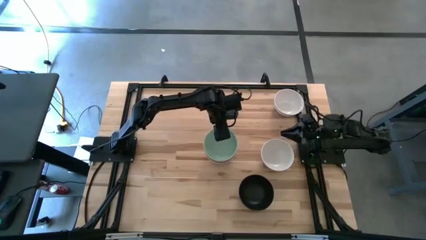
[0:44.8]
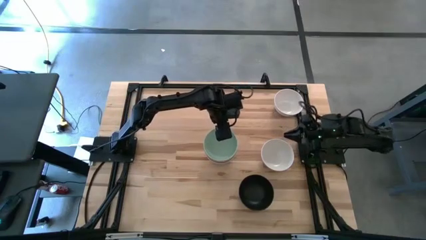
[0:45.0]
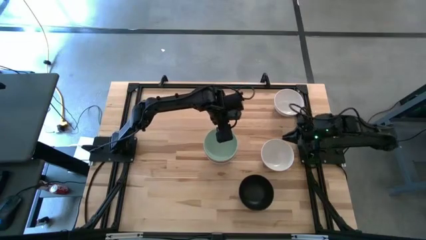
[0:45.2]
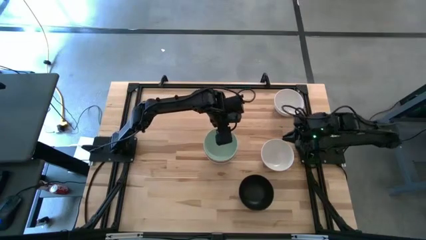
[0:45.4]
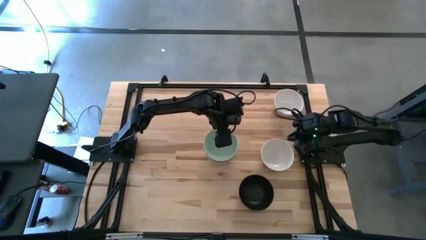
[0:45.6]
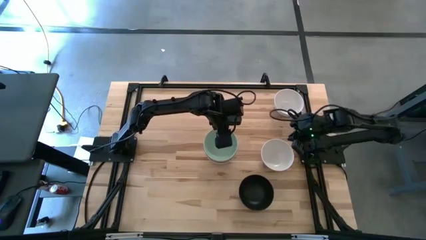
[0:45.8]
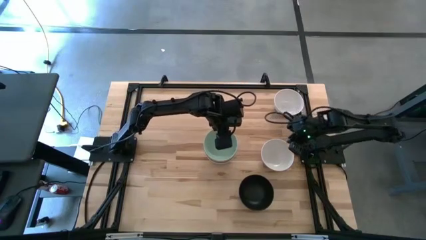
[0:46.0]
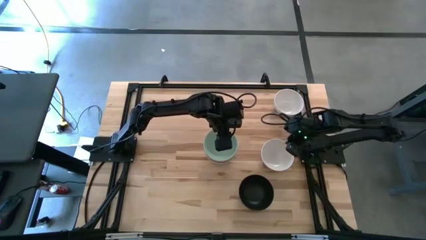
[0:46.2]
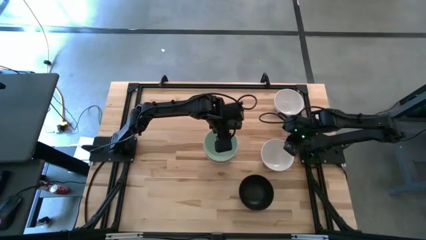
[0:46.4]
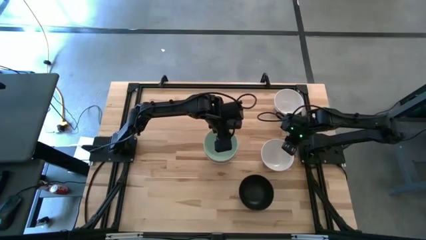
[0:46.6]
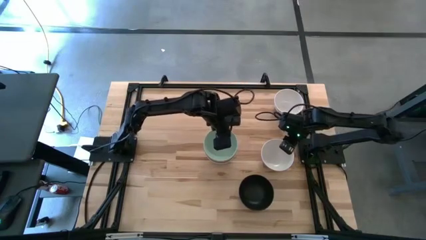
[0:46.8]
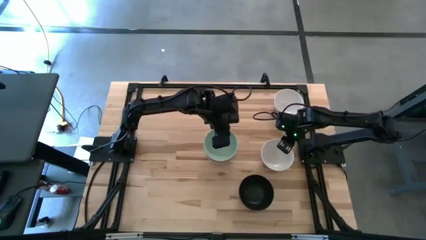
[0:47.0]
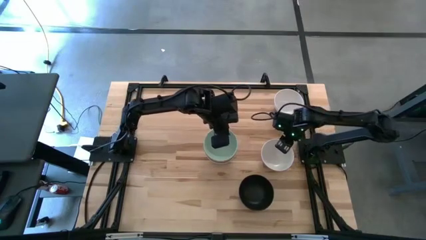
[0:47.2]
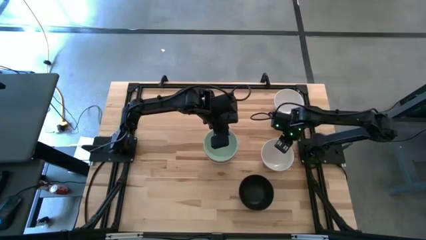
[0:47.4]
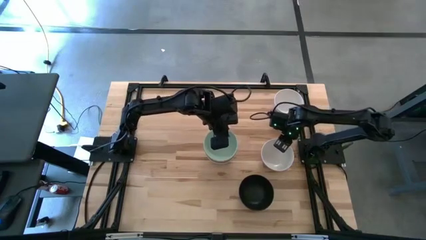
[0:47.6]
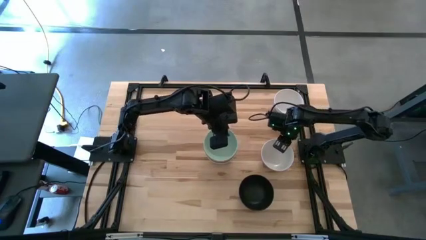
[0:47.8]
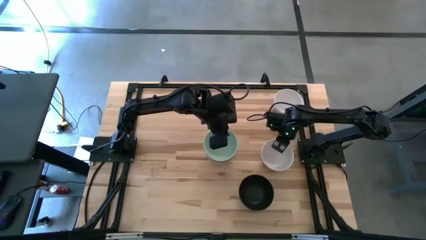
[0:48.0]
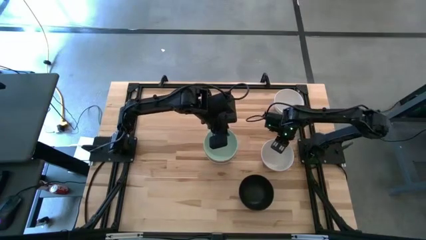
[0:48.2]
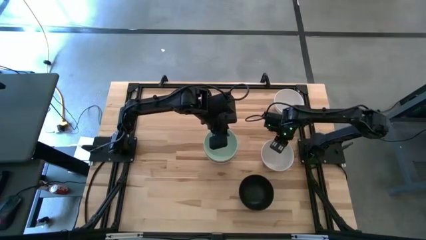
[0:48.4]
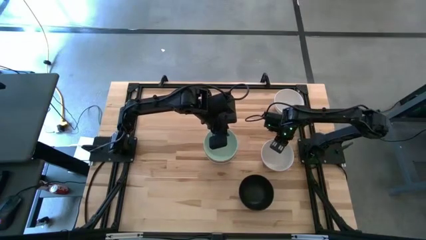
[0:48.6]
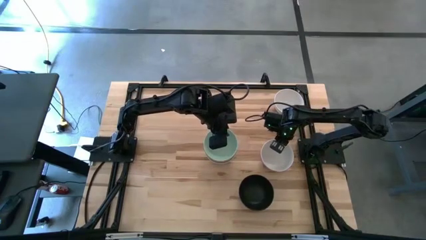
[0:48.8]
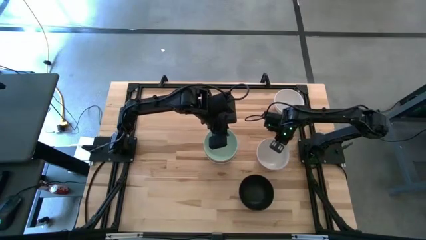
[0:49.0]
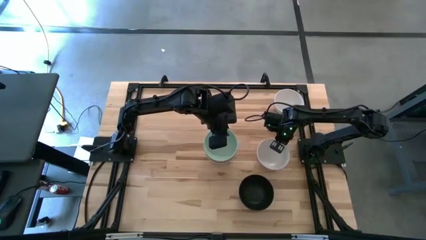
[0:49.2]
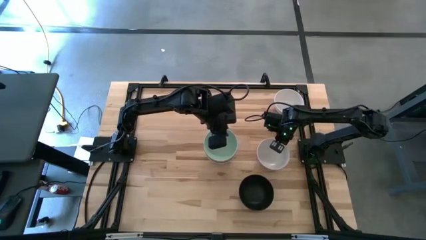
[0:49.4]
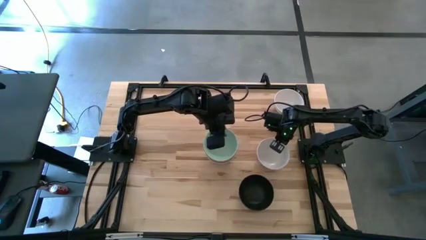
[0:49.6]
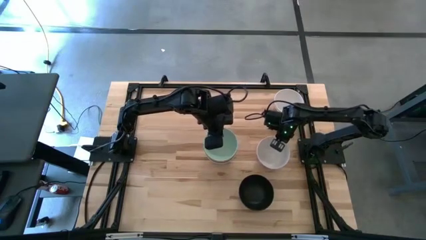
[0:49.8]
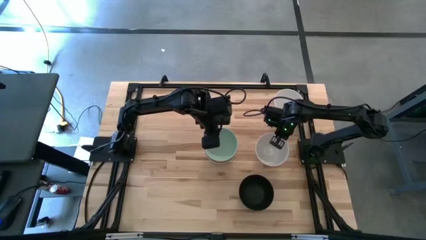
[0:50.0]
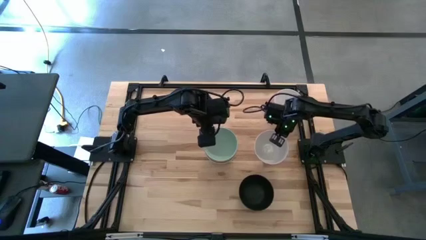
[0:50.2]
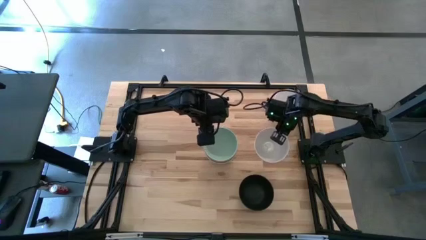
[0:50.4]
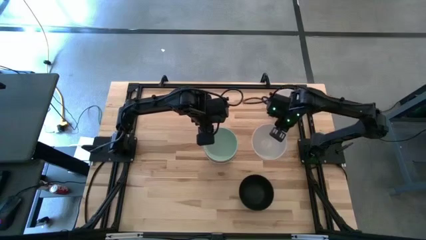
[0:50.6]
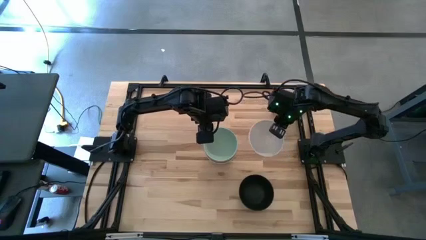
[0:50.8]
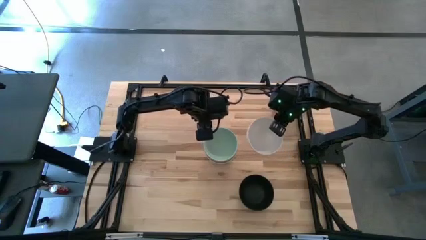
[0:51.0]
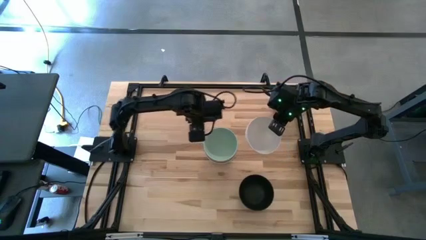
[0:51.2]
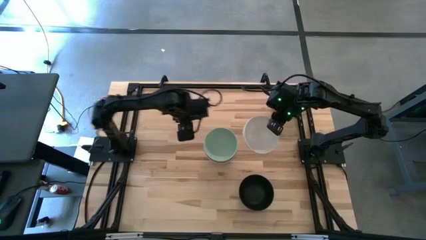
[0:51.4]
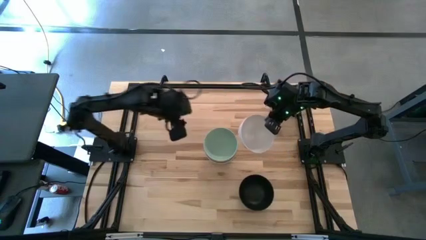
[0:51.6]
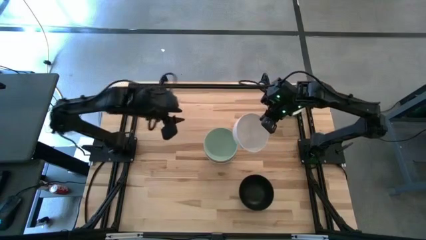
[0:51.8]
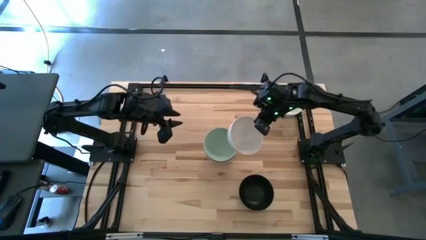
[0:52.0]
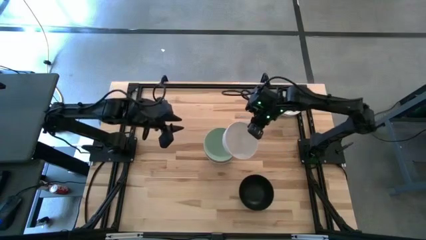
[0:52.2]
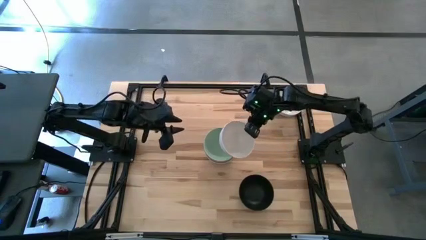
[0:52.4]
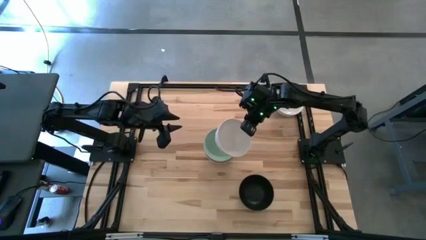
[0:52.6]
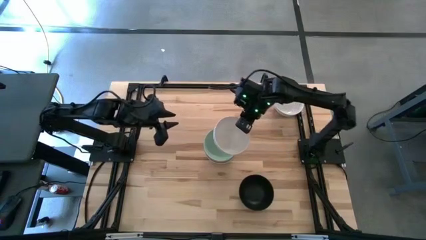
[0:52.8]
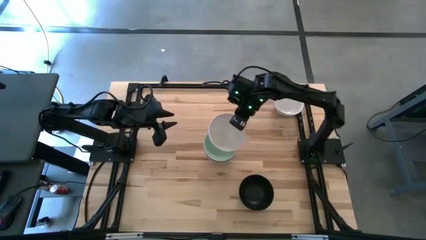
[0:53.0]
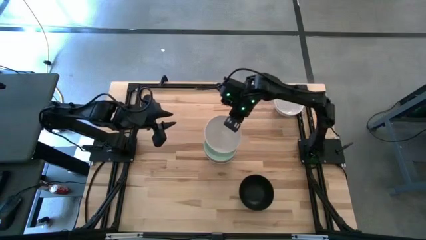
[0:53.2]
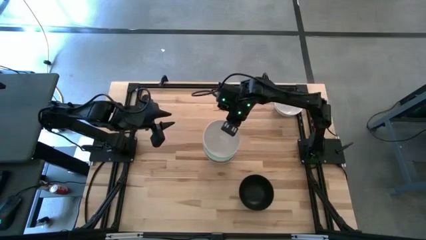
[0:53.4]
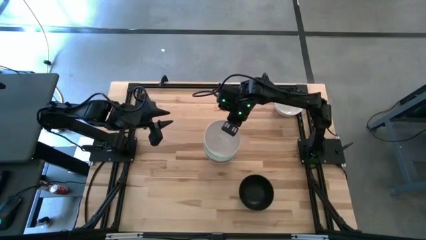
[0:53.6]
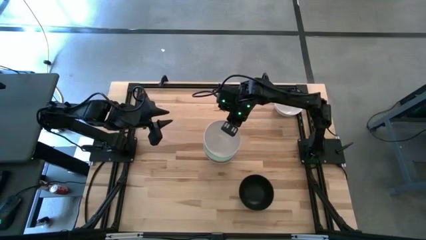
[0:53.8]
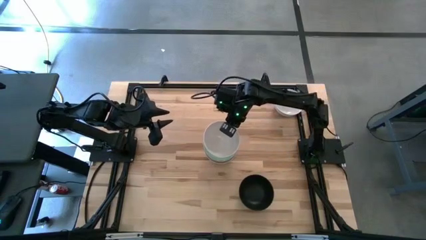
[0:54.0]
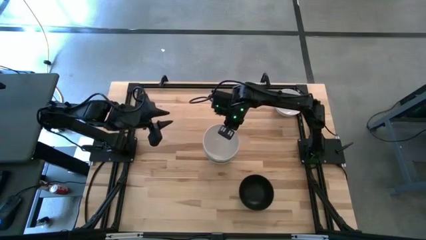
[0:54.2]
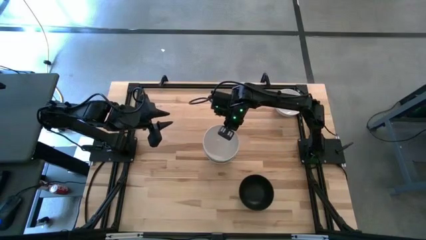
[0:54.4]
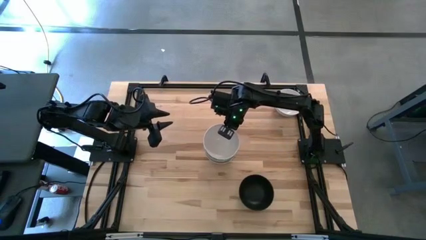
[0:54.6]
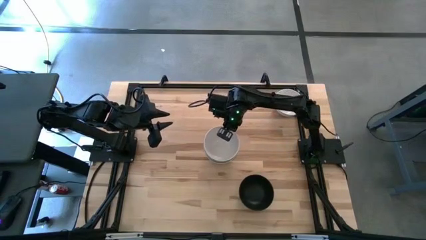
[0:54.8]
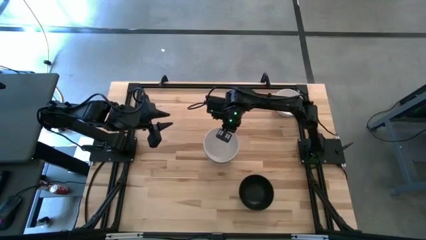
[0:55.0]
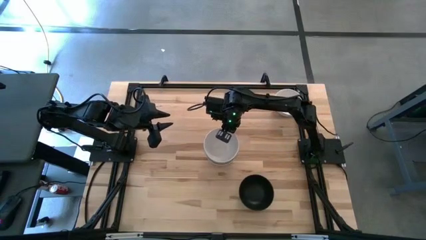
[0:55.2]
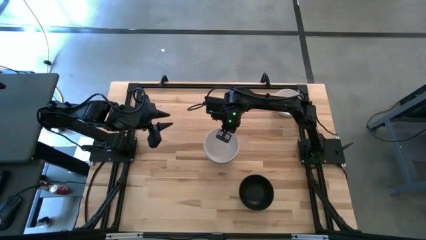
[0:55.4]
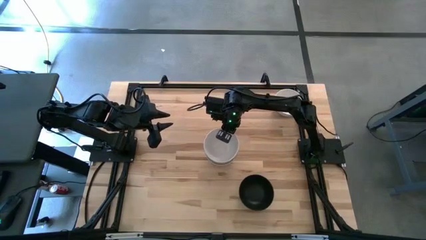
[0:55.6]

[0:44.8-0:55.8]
Task: Nest bowls inside each other
Stack the bottom white bowl on the blue bowl

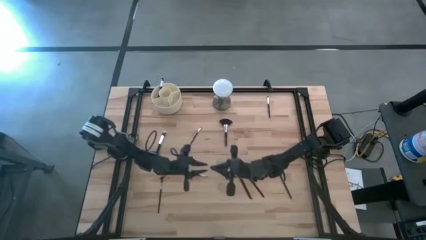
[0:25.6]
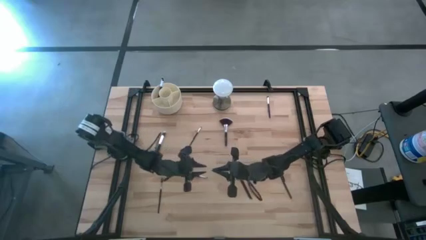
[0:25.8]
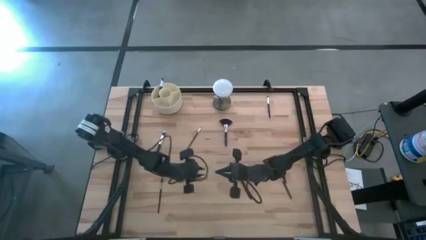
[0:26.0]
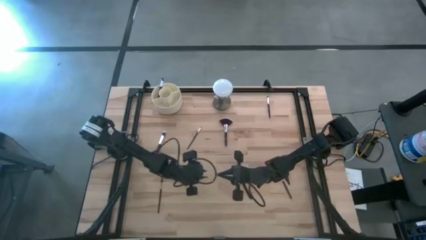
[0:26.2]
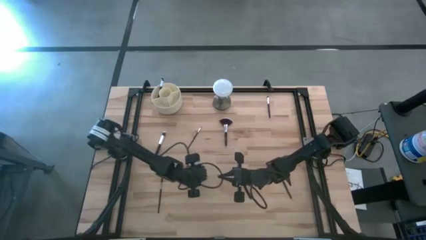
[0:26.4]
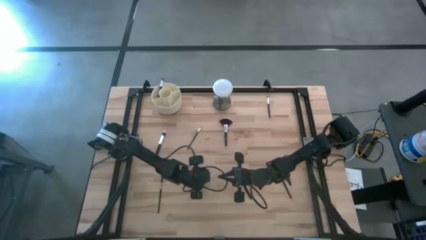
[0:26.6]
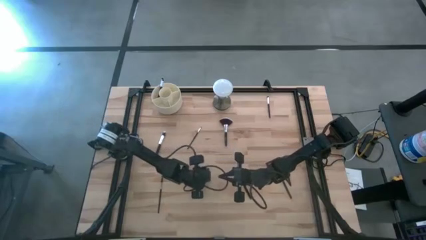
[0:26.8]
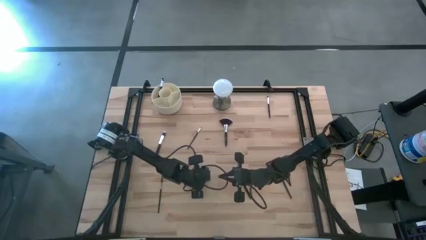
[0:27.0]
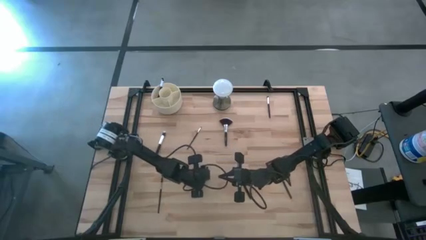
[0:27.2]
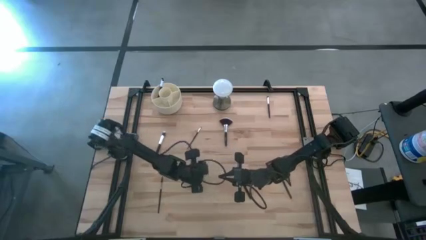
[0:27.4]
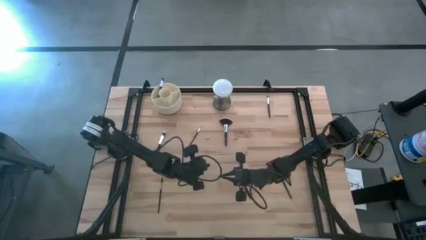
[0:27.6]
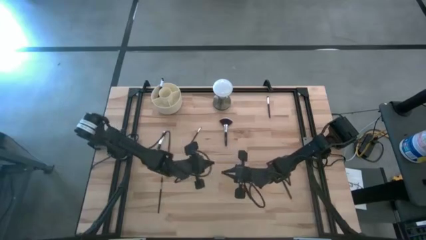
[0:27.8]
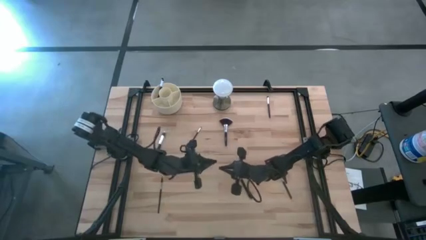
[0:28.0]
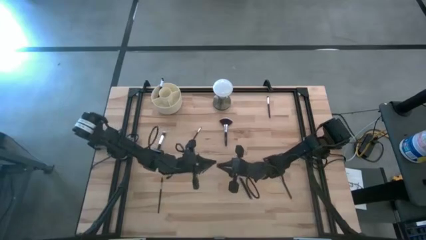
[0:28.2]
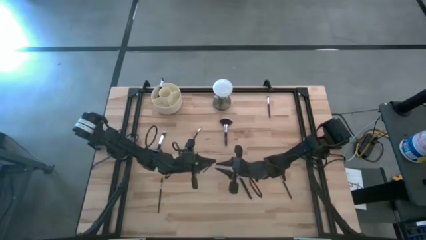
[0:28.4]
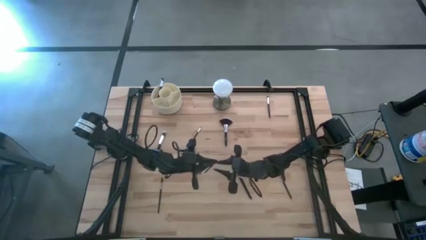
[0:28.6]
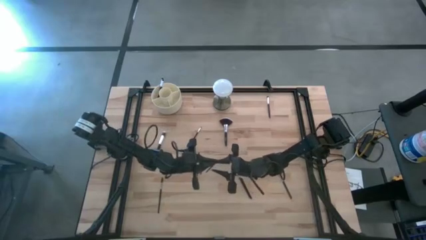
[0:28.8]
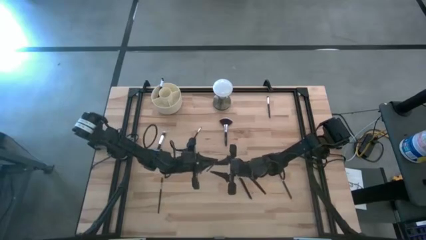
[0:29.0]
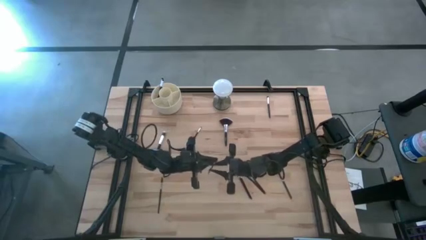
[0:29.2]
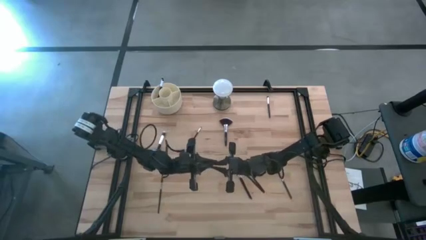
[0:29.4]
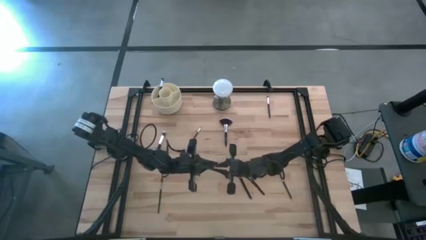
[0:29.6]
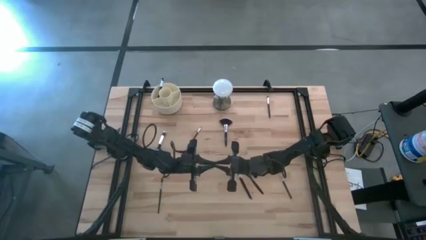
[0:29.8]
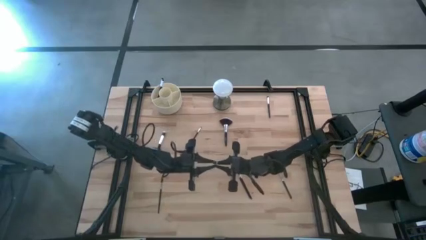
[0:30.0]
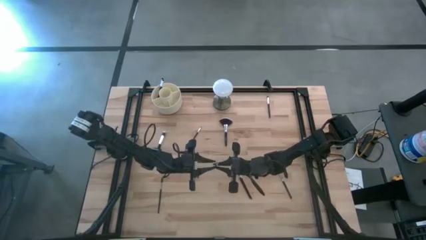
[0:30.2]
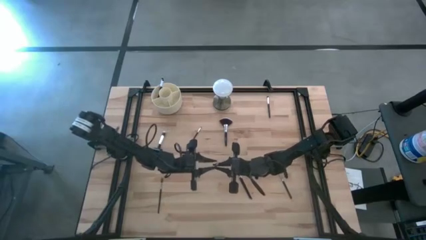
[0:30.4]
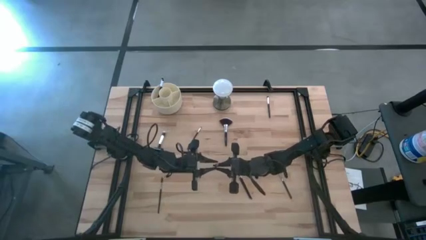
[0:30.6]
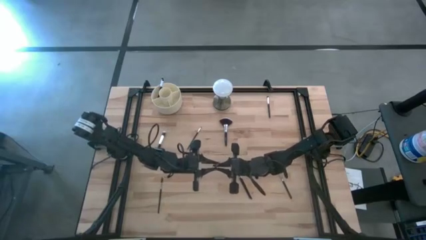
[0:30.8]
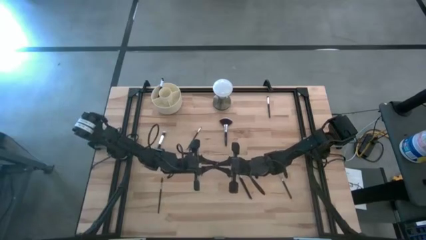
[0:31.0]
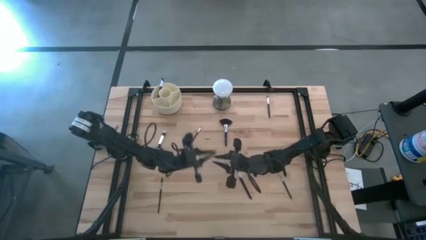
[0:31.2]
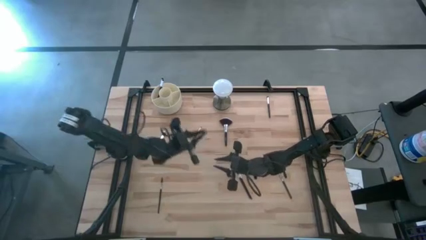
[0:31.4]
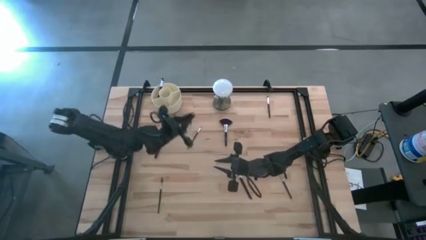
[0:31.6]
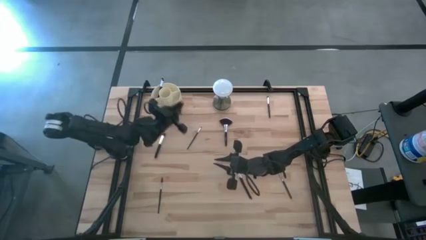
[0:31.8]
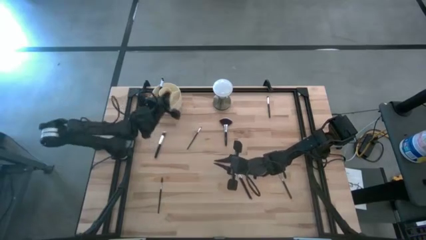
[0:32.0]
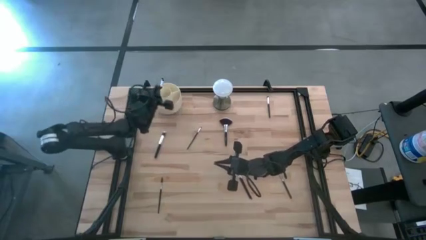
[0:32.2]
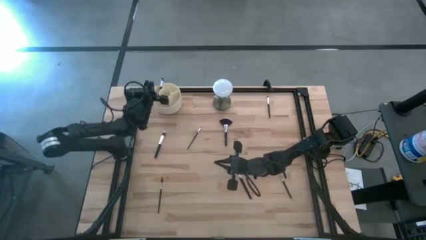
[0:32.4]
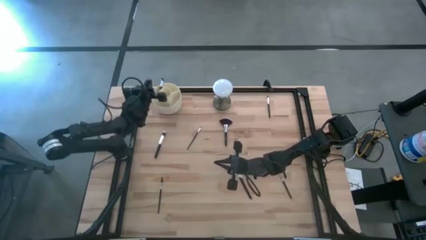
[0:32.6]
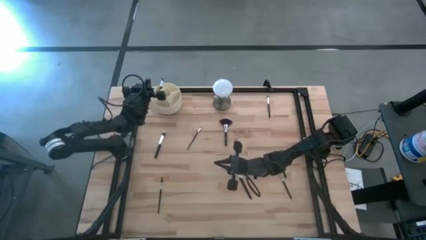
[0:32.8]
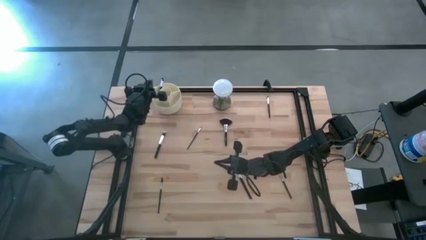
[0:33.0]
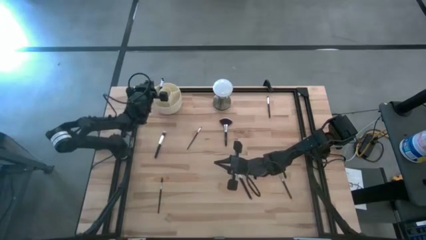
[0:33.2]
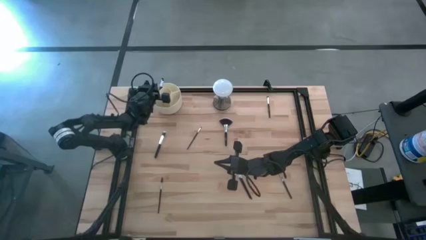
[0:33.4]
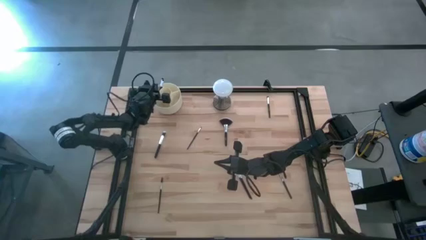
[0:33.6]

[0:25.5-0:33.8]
Task: Put items in baskets/containers
Put the eyeshadow brush into the organizer
